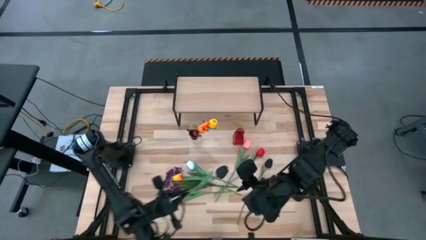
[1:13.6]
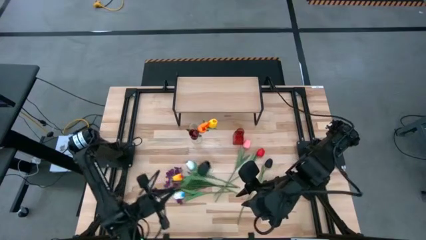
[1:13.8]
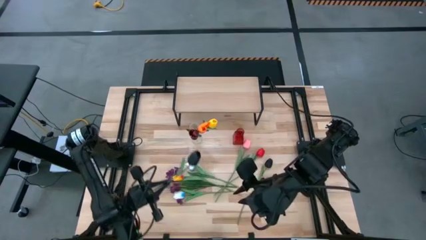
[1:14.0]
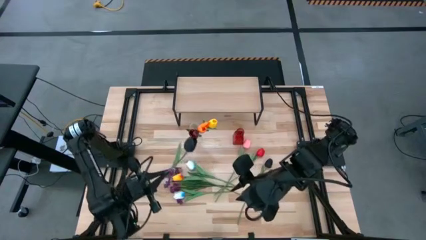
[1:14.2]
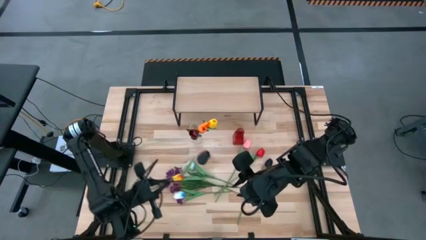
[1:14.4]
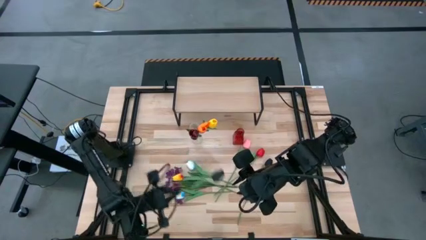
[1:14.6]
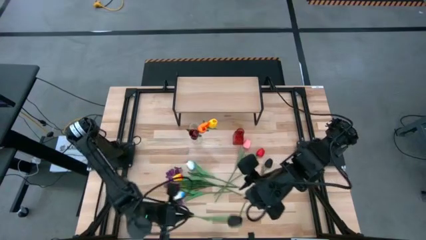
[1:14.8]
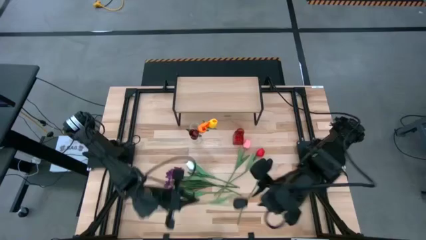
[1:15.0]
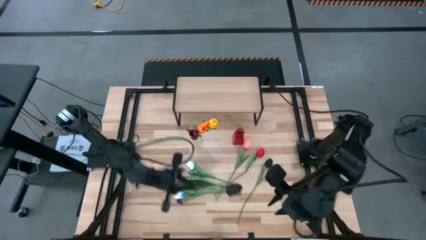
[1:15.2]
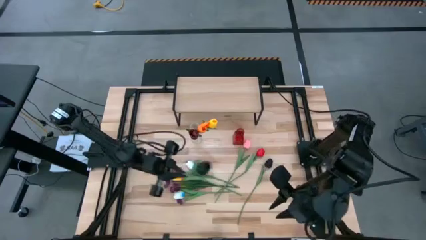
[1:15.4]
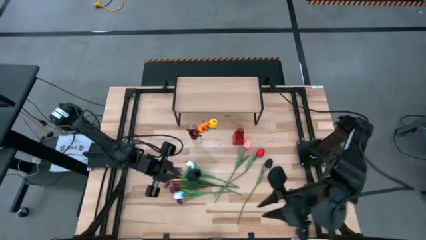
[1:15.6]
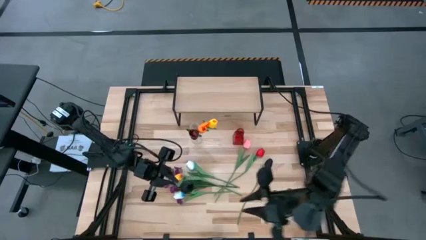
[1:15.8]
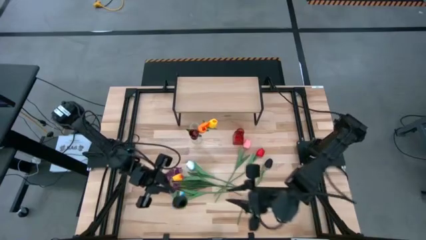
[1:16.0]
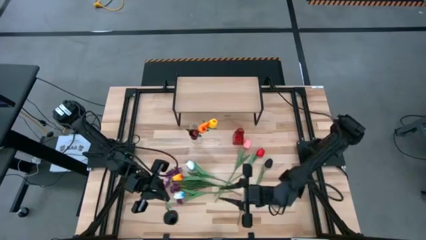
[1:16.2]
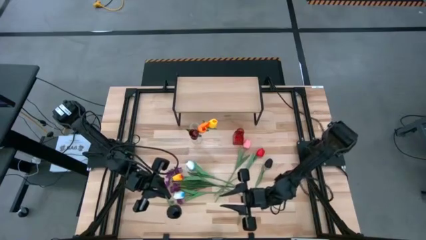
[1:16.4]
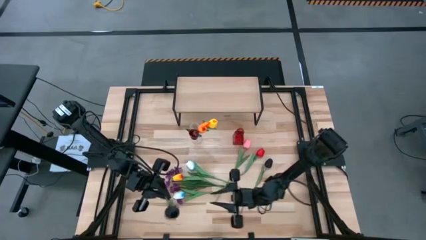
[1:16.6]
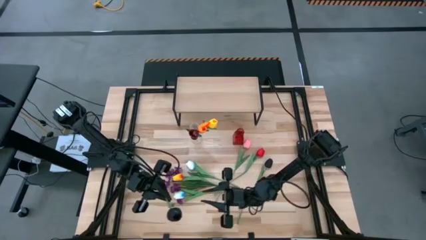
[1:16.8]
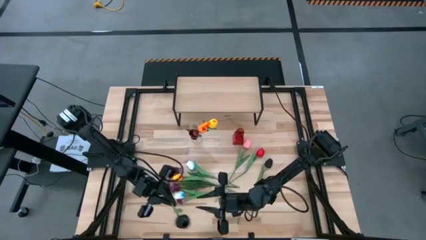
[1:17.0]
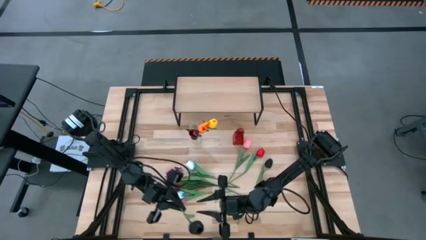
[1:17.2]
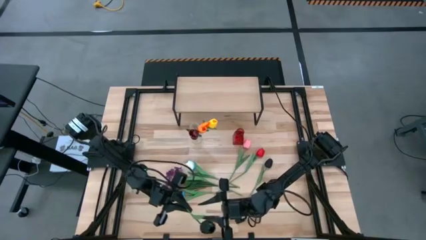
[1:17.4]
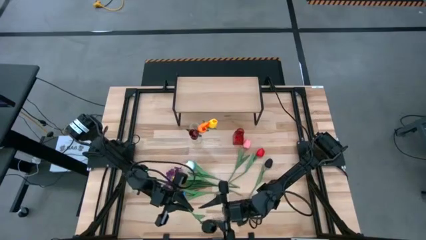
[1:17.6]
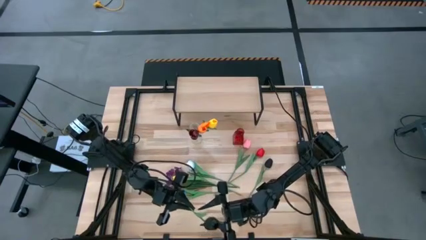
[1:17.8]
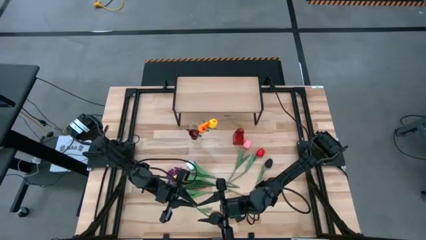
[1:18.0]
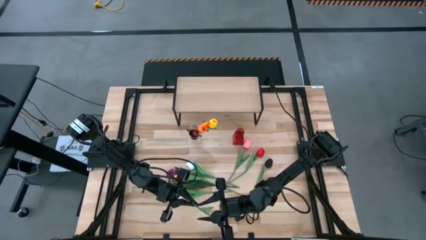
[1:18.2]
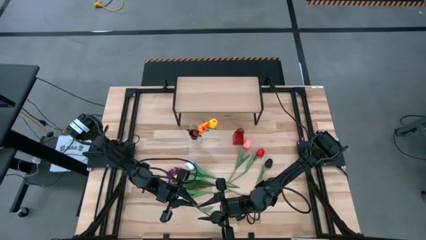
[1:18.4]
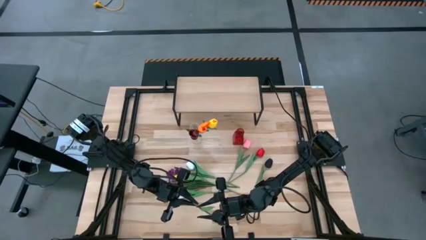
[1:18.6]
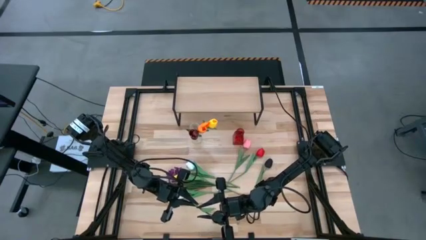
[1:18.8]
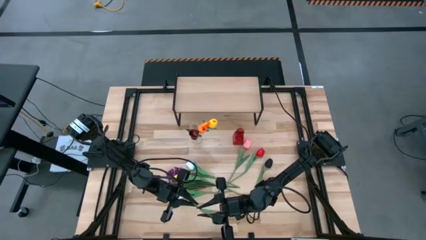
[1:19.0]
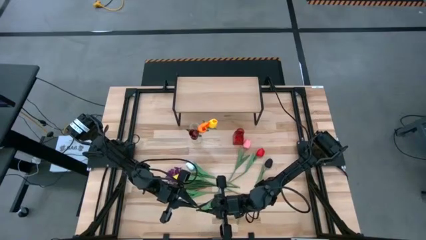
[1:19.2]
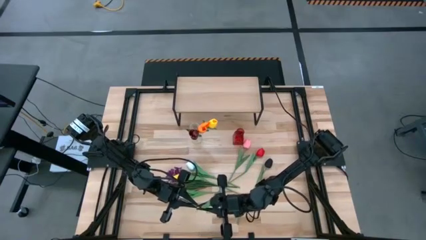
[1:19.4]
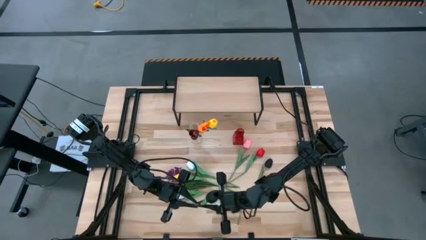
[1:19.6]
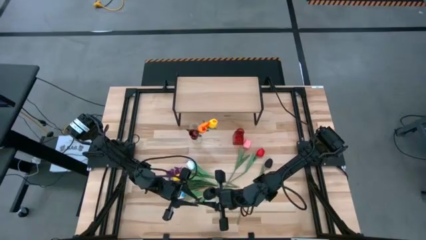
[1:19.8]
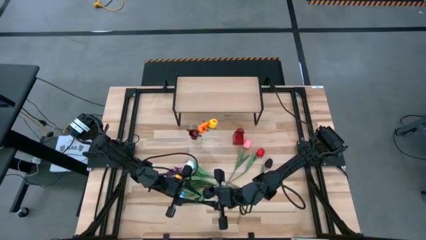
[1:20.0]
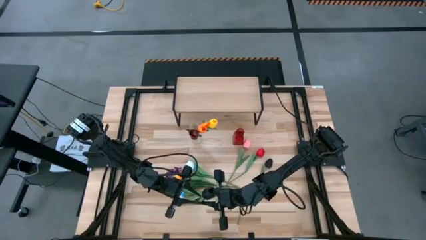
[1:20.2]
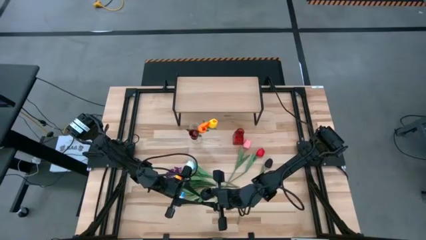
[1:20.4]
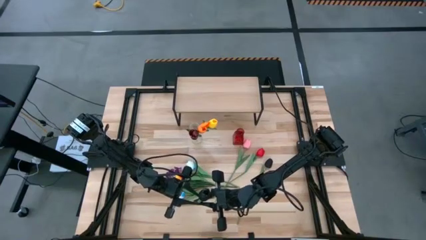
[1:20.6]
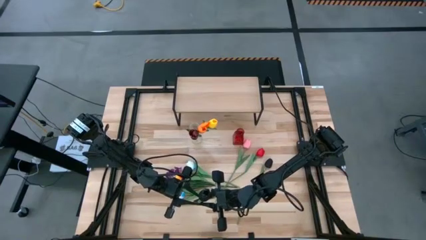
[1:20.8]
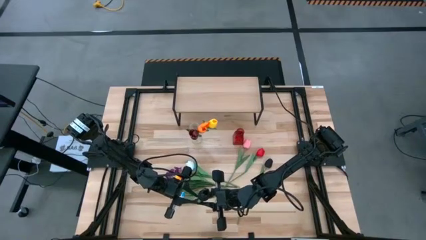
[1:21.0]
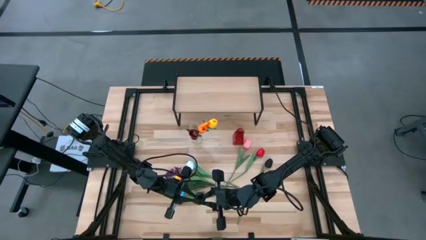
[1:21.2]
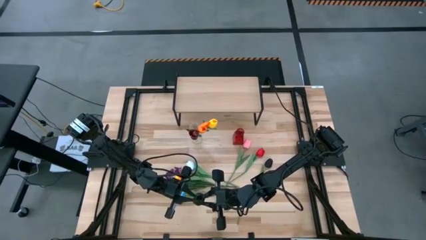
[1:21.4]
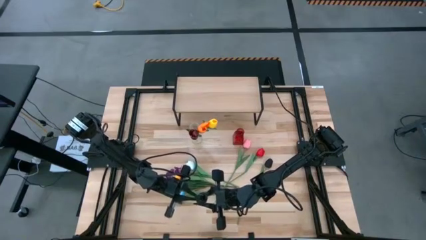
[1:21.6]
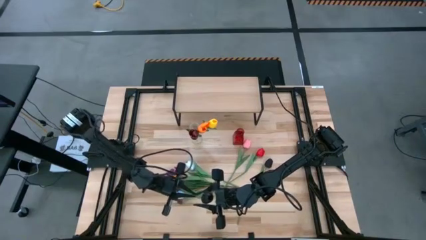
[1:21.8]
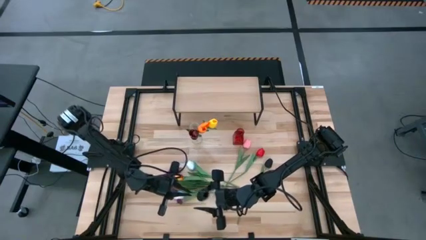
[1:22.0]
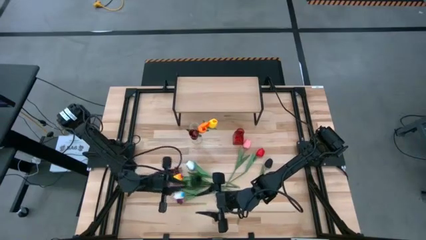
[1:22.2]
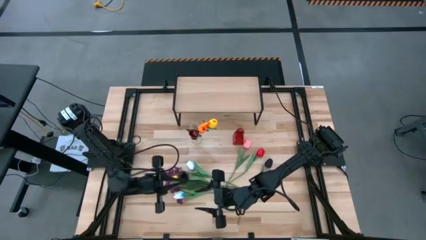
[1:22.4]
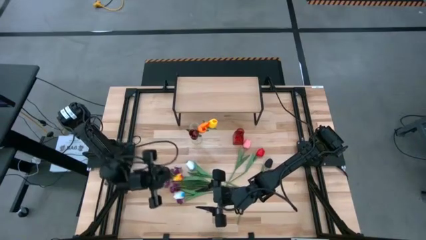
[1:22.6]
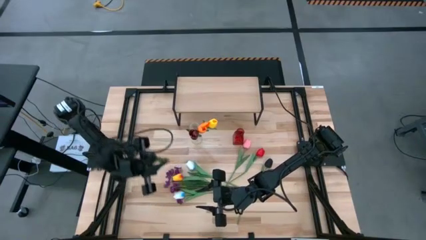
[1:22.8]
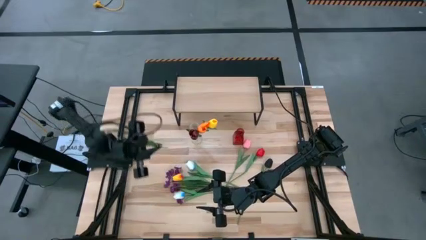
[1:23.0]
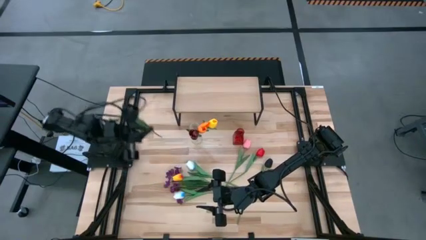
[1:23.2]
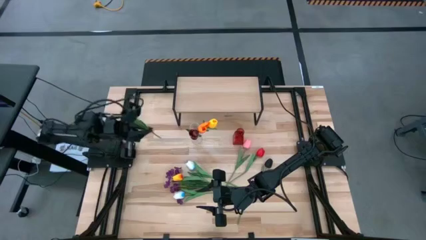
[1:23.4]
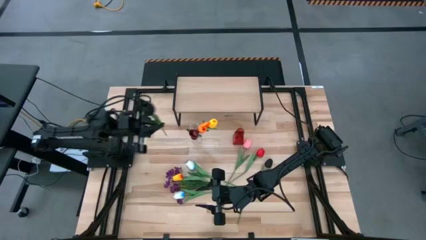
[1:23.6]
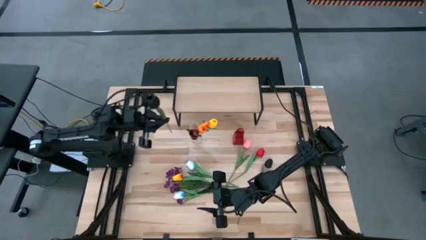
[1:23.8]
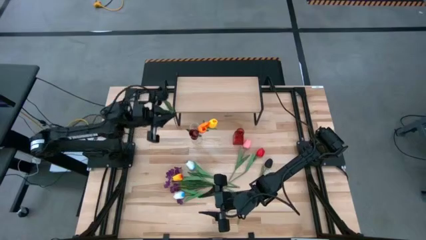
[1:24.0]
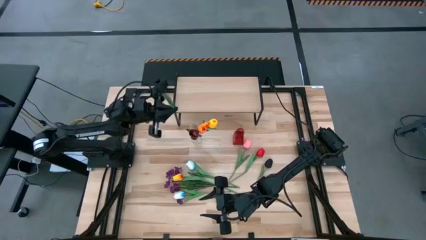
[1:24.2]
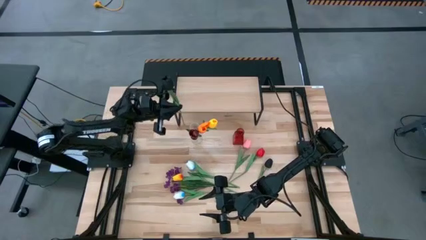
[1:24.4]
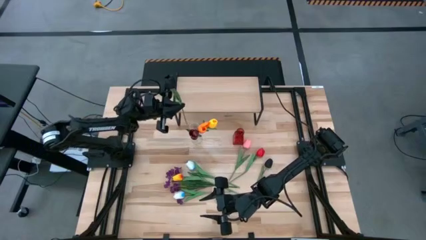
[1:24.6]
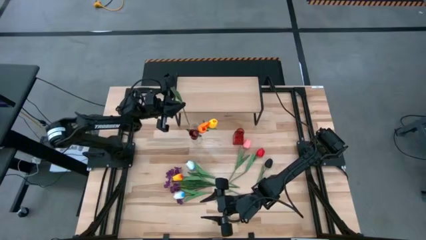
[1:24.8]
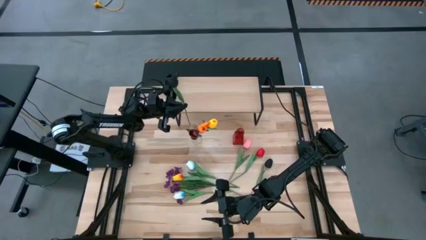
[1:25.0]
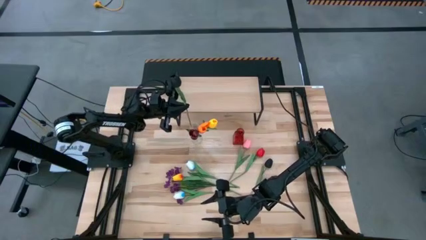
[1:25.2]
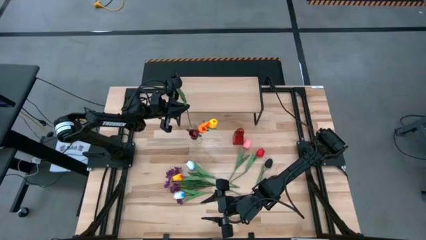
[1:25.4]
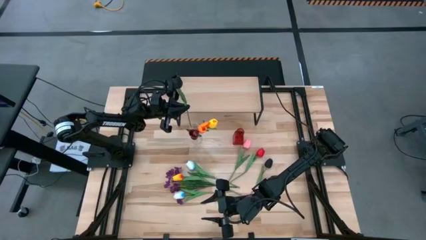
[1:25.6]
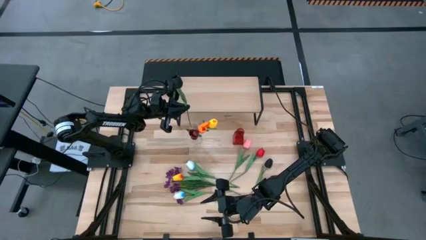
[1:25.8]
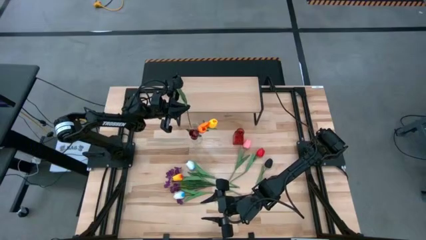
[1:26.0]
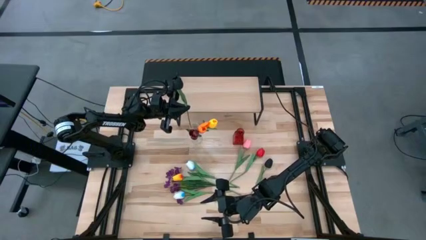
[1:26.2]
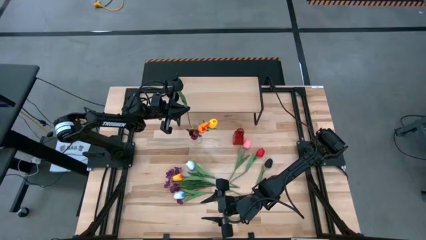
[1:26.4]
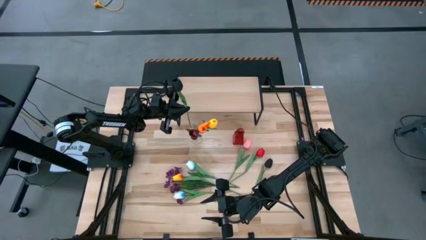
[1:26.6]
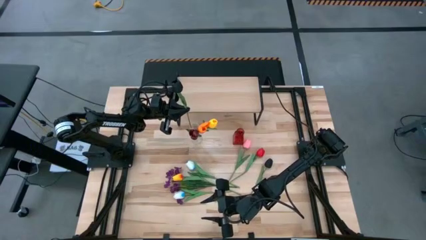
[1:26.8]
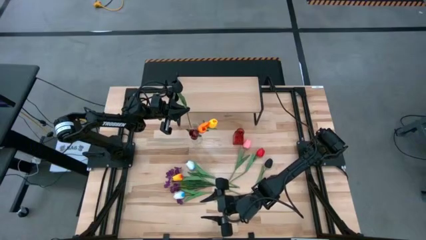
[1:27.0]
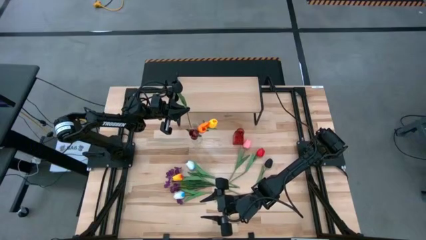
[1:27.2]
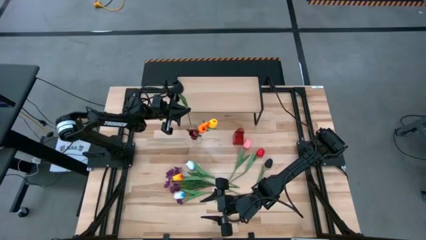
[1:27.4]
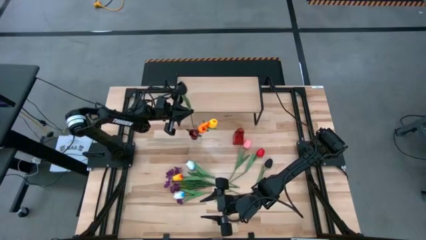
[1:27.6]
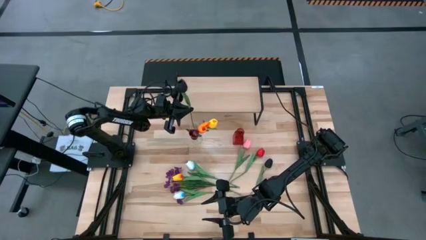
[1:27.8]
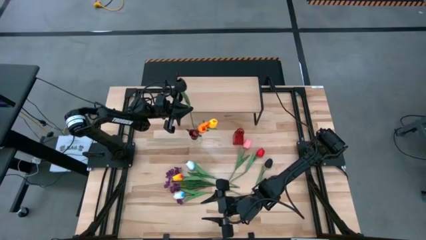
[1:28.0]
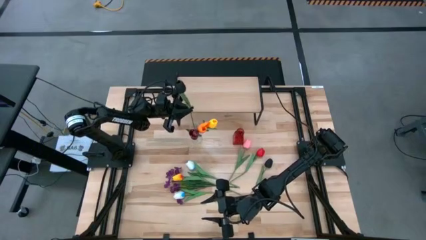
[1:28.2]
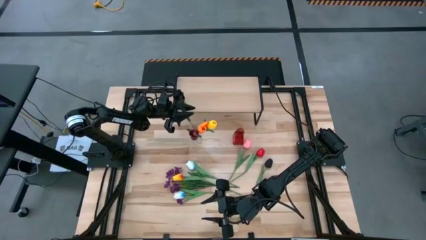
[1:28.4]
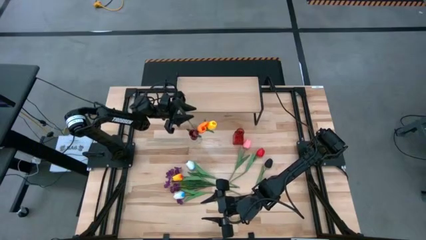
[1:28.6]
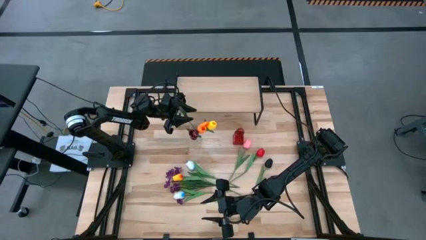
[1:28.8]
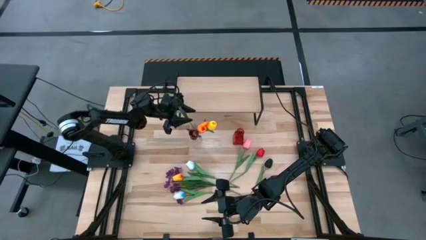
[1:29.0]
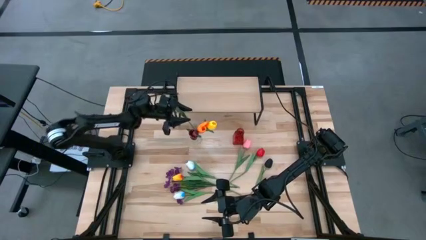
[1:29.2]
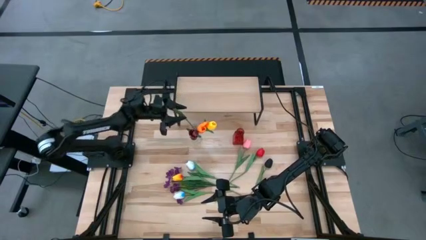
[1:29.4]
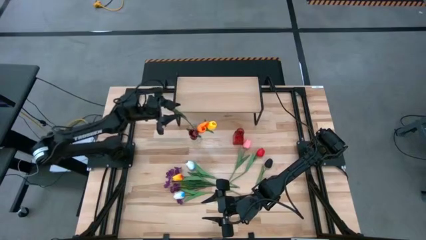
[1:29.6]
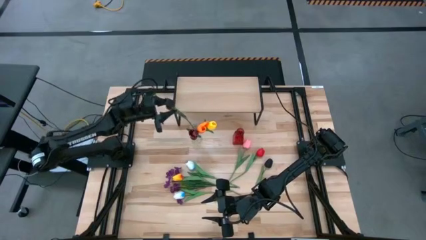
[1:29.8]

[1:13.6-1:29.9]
Task: Pick and place flowers into a vace then onto a shelf
Put the left black tulip into the transparent vase
